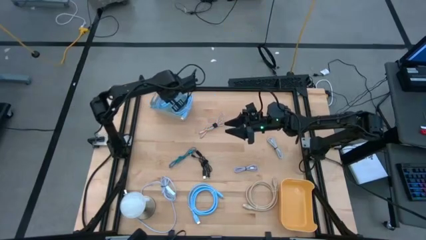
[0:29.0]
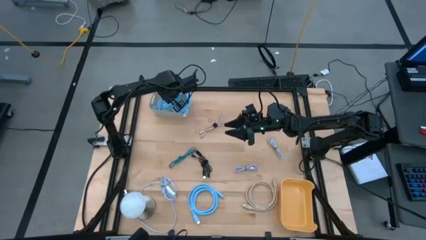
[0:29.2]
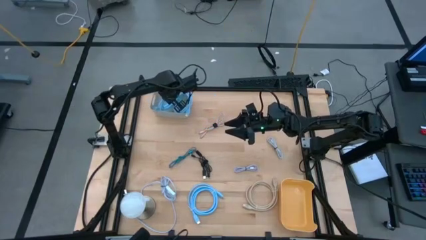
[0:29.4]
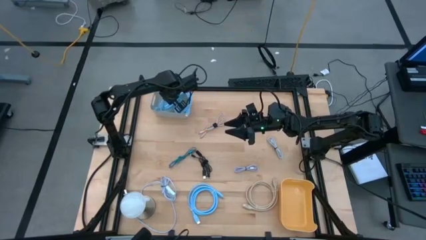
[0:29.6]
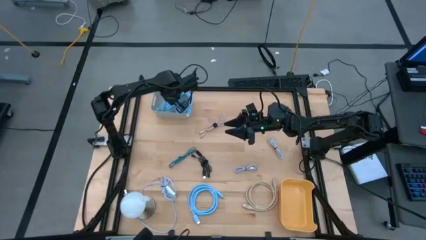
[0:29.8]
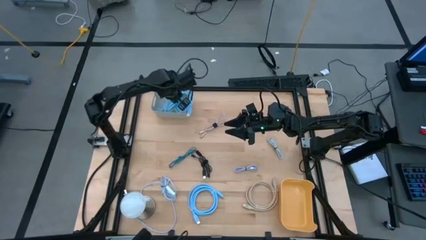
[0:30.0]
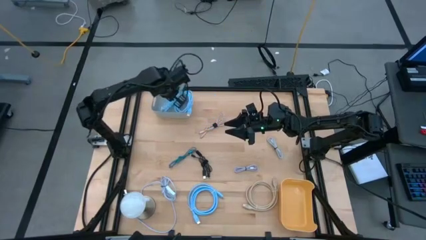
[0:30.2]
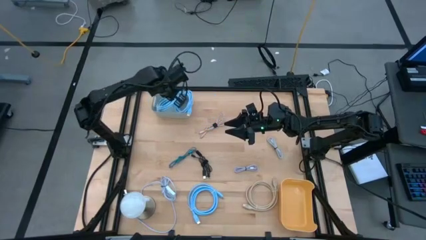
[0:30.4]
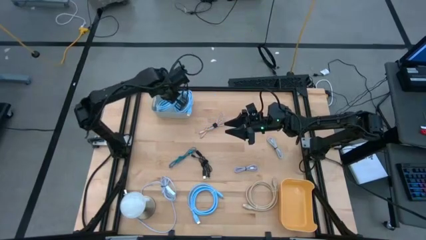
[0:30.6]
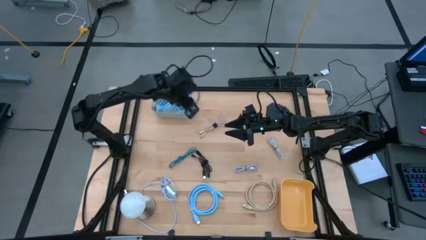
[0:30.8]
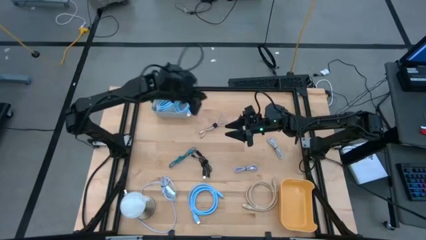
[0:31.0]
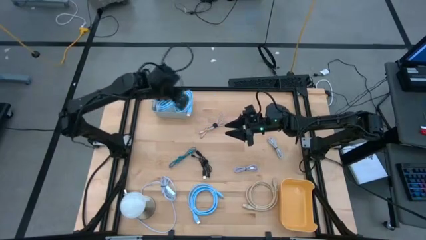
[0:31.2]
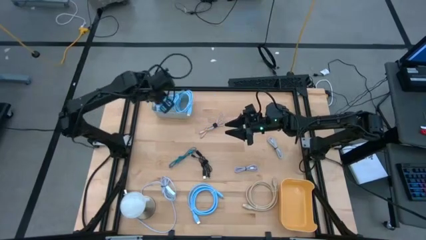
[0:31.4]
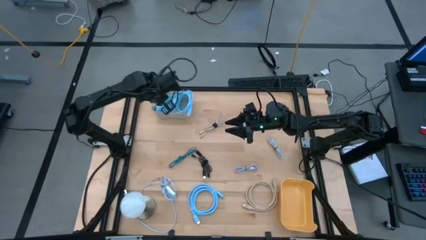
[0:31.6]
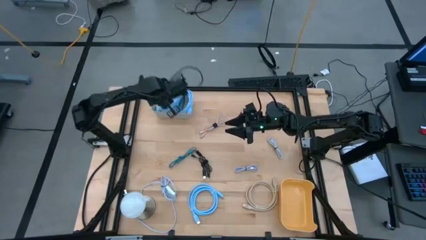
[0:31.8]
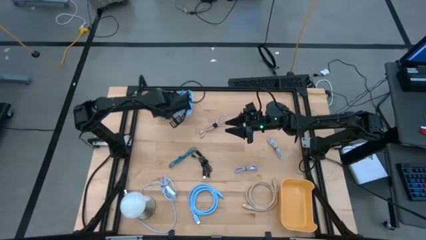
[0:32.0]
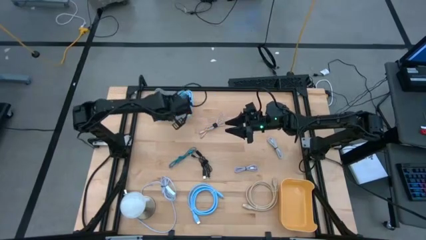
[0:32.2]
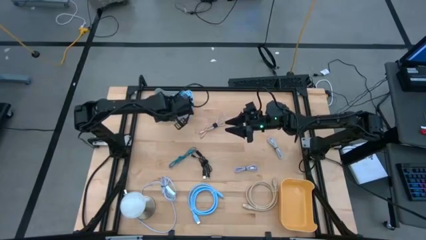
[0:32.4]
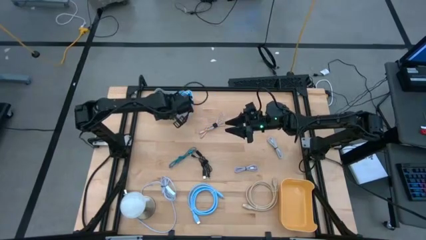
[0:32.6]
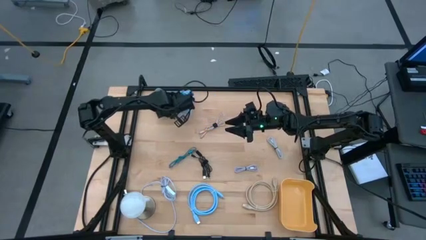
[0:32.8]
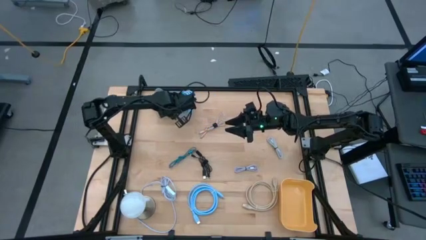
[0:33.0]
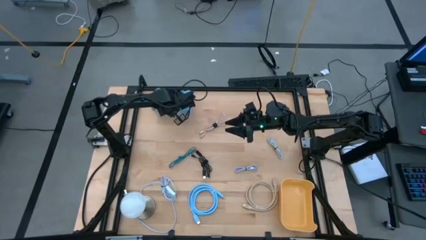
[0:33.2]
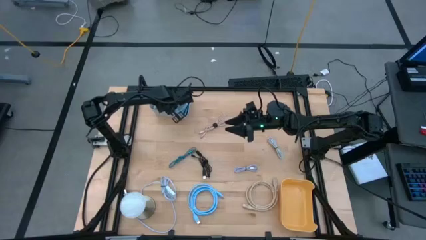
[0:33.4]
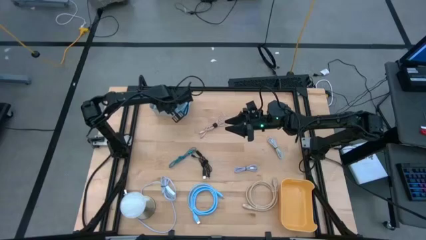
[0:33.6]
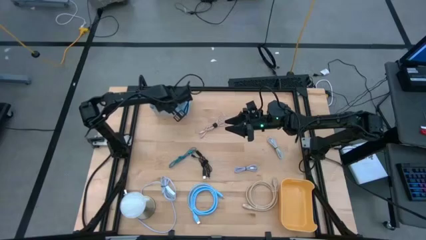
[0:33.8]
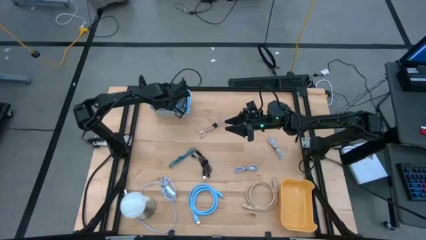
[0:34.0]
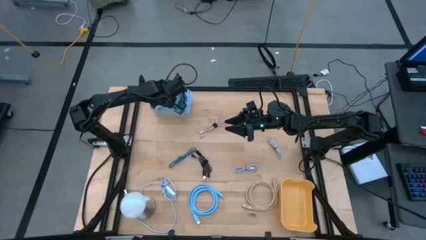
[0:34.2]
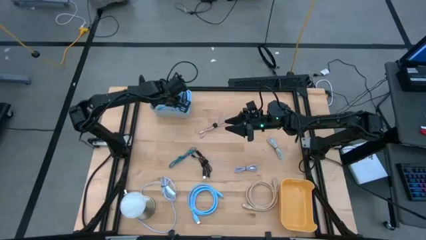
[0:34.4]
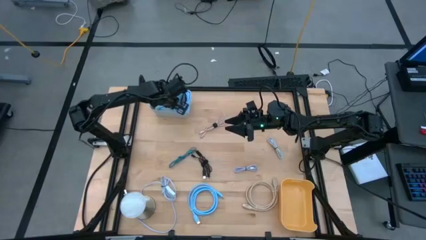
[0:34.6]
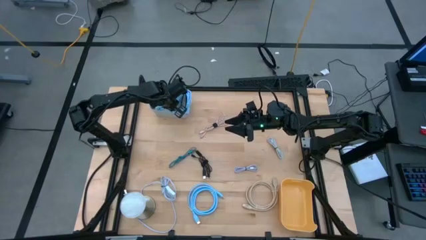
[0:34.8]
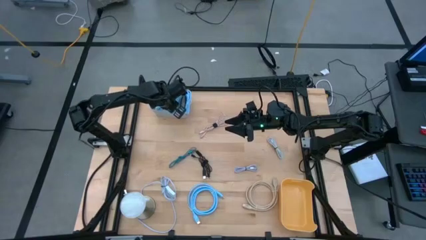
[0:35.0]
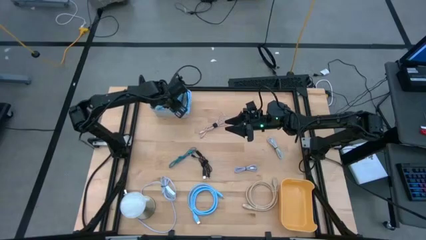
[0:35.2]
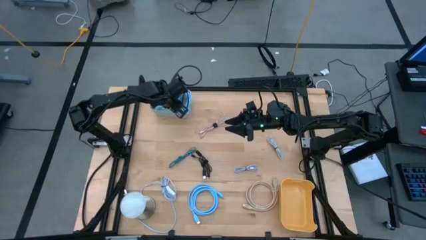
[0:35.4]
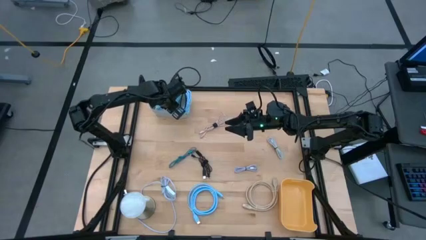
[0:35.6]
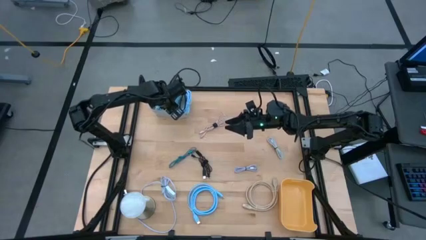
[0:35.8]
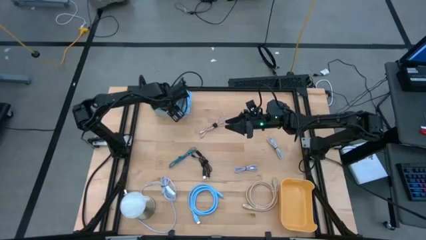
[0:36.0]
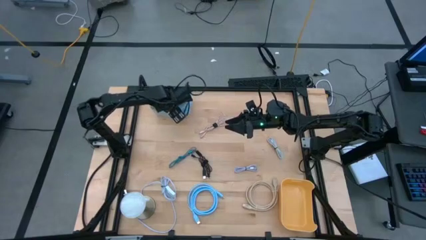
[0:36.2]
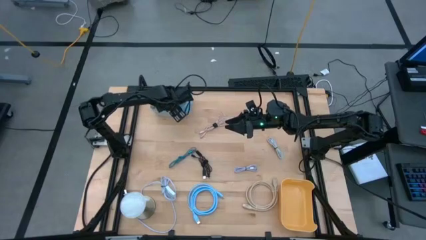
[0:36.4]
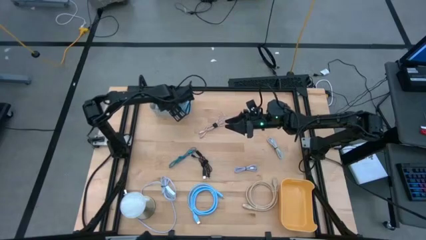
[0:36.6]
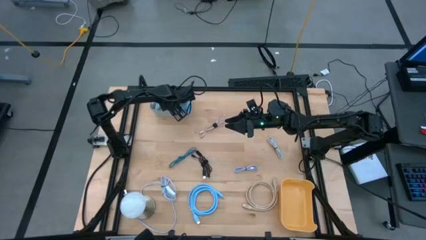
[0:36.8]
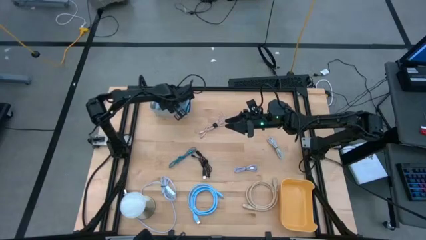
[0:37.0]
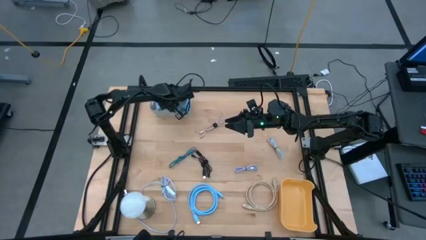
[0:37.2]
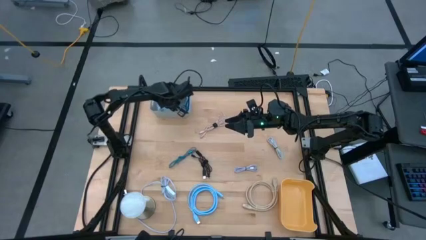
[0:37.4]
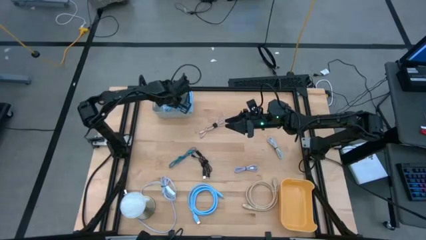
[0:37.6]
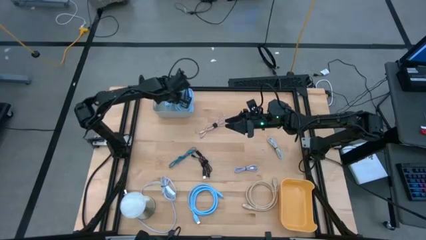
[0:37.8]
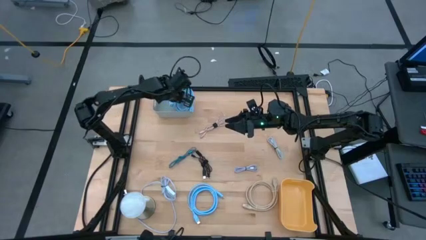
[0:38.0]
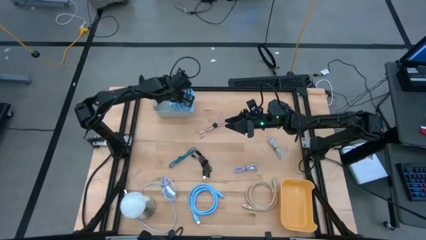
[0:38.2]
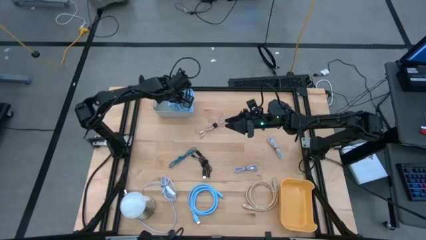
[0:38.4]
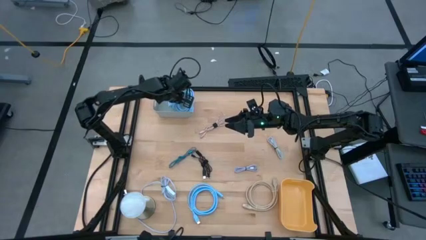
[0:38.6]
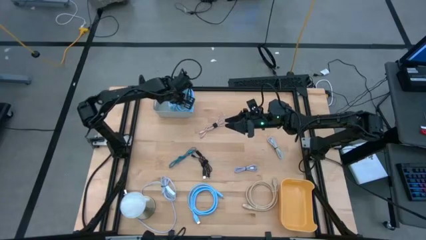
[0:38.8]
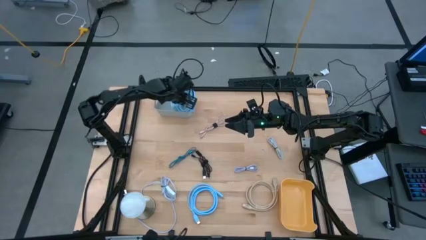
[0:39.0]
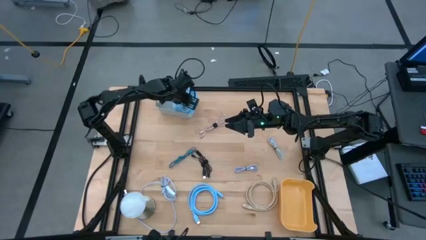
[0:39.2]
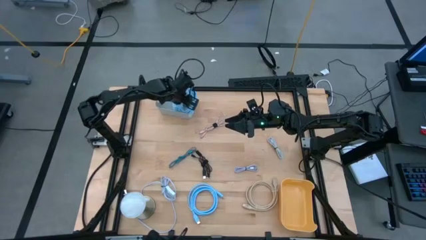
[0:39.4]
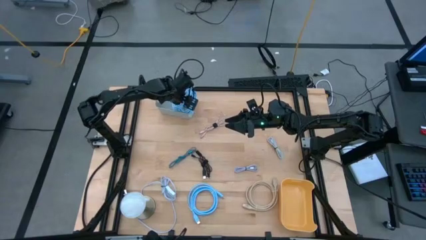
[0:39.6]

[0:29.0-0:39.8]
Task: Pick & Place USB Port
Put the top blue HDMI cable into the gray bin

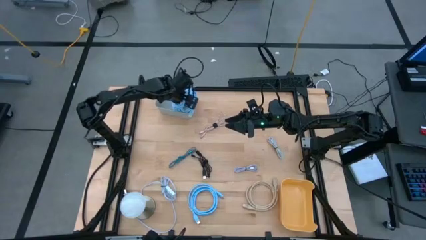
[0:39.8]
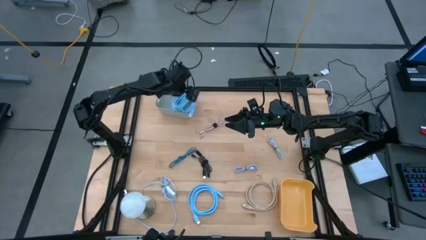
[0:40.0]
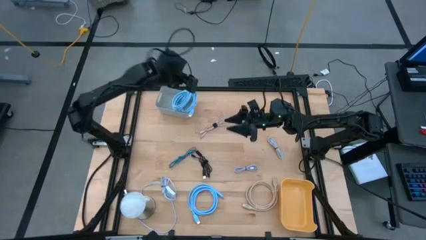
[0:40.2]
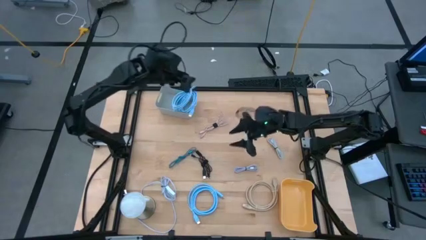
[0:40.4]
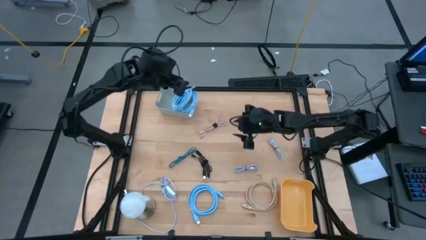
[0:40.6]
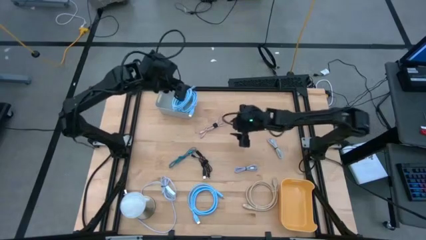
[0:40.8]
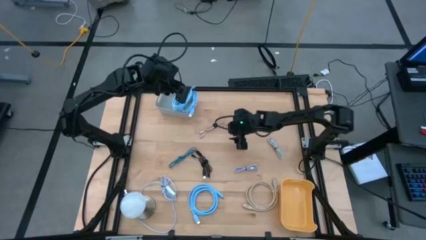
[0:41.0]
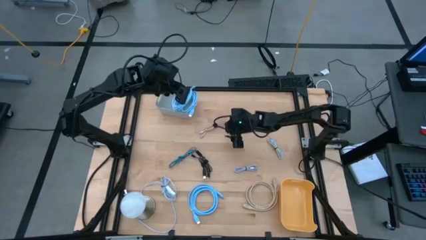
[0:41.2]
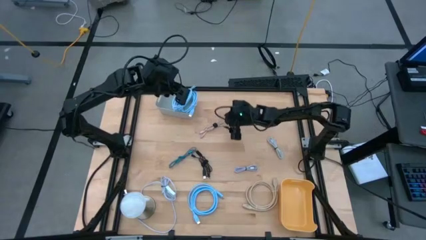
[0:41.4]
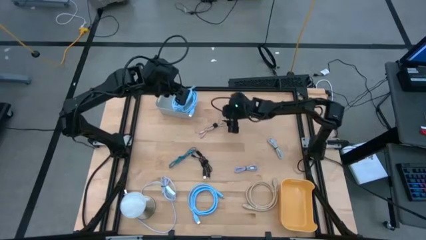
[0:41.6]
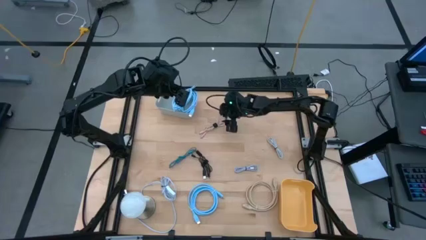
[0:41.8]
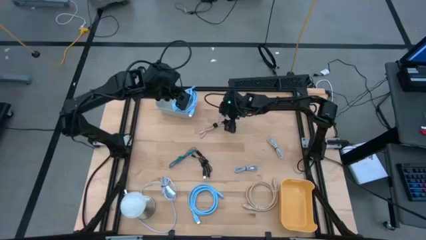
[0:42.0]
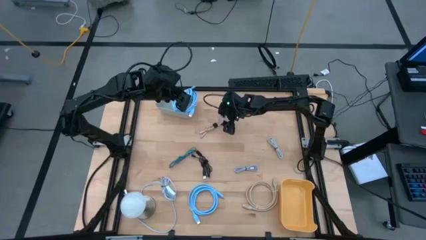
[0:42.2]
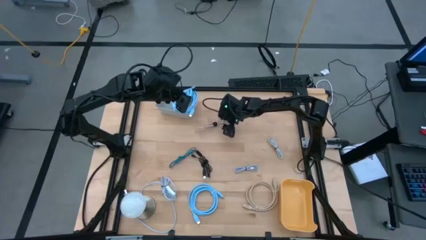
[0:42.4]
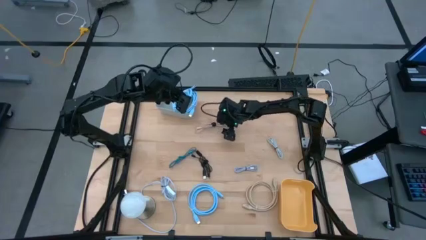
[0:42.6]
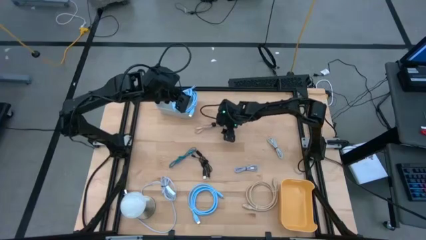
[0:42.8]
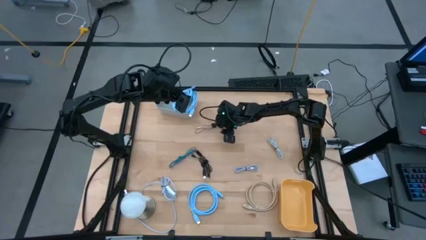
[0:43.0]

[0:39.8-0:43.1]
Put the brown charger cable into the yellow bin

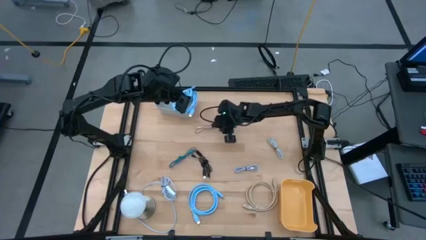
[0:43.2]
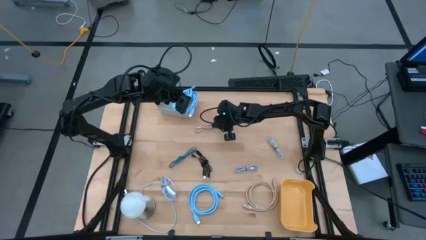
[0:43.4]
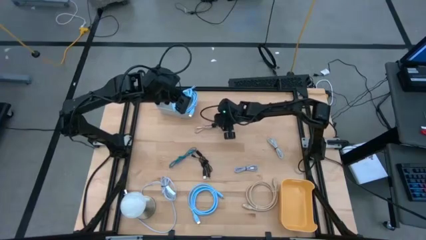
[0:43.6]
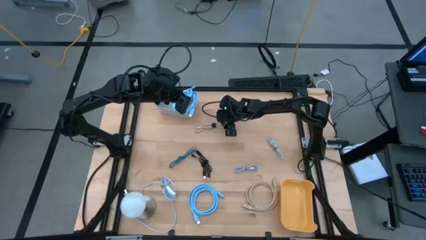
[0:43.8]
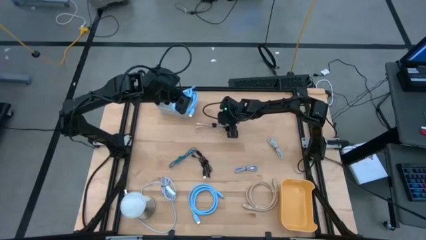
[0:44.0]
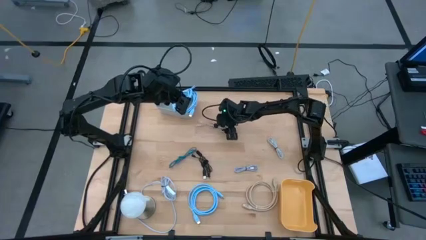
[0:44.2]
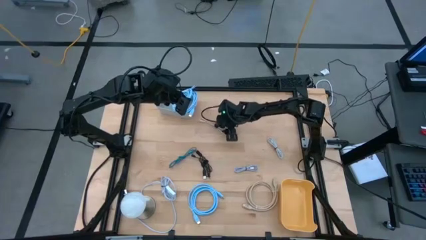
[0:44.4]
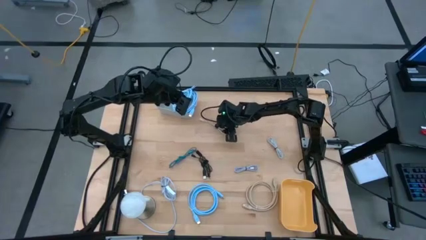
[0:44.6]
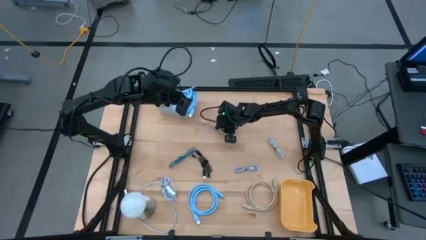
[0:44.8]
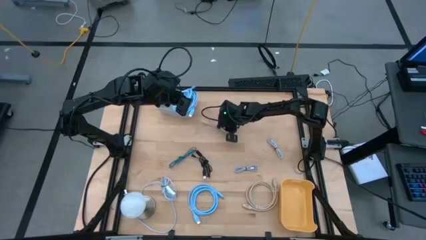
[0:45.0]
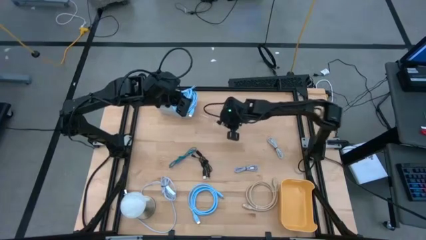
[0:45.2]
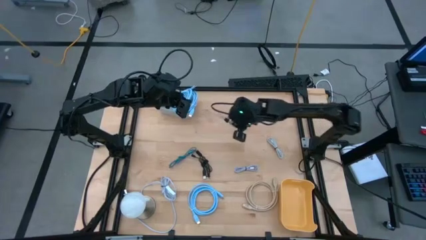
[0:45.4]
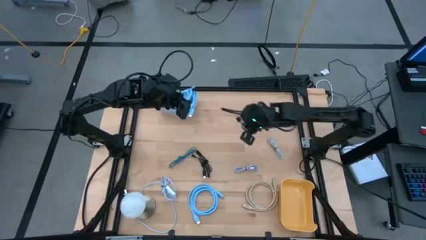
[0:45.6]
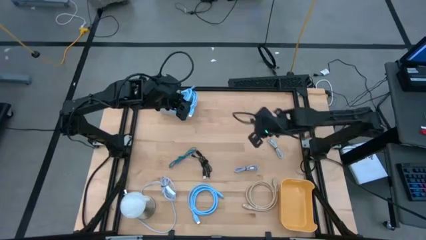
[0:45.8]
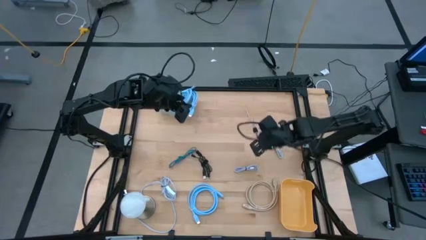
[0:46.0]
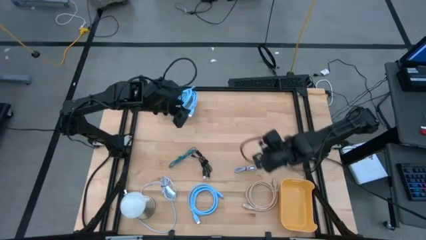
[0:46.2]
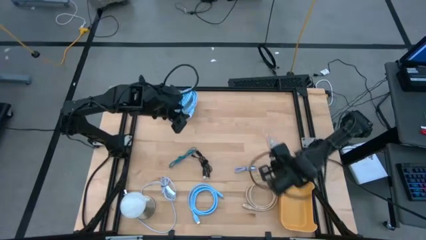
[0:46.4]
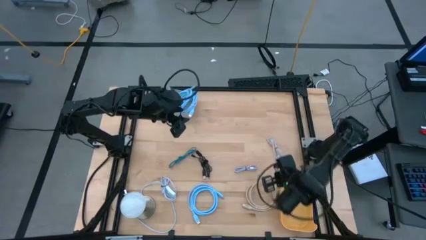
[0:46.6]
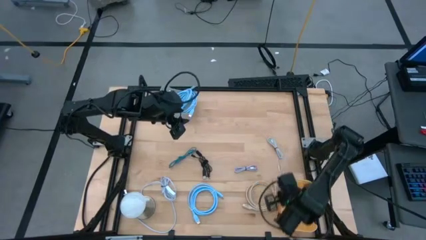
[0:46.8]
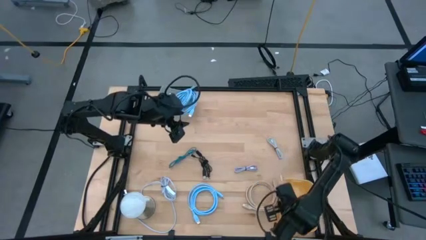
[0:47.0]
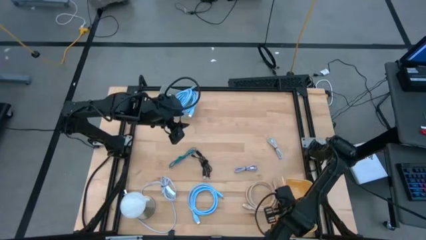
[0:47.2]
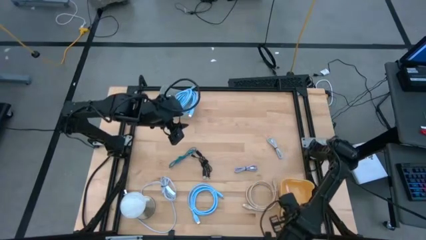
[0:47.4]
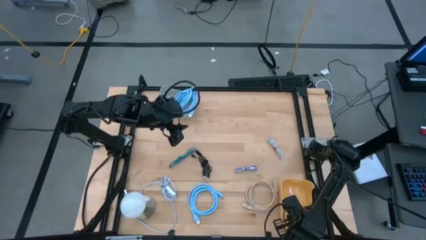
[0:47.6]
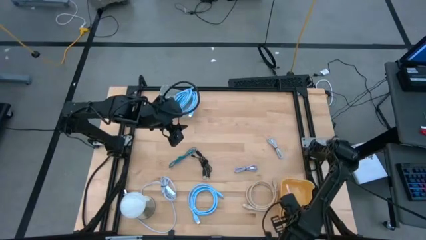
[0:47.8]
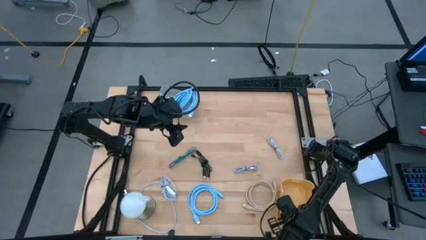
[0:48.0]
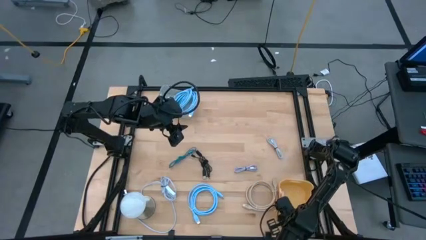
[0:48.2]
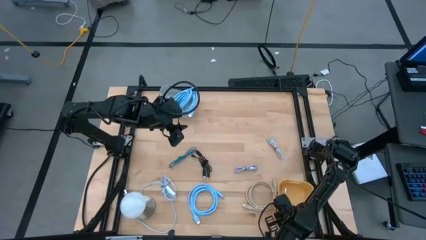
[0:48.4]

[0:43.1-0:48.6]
Put the brown charger cable into the yellow bin
